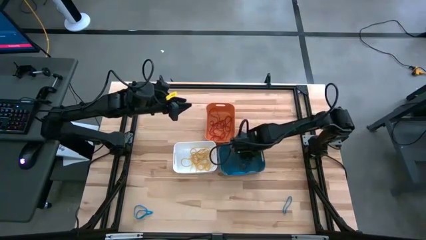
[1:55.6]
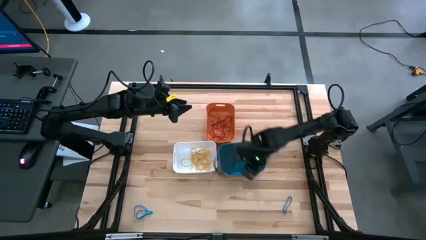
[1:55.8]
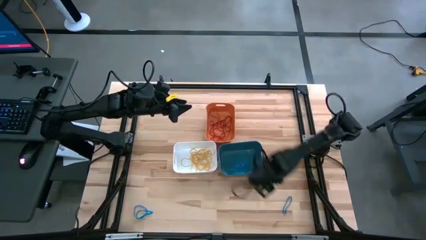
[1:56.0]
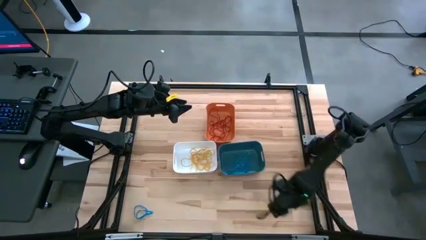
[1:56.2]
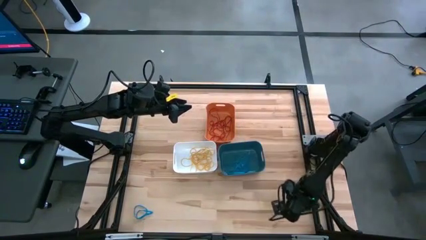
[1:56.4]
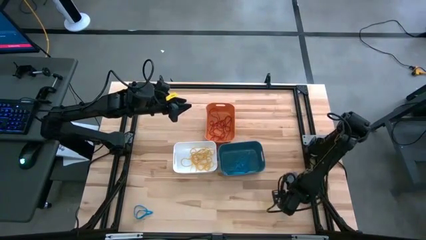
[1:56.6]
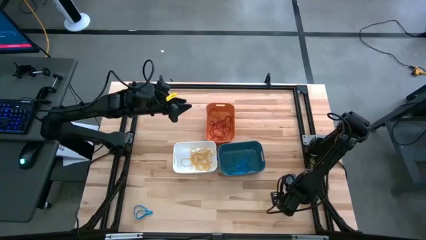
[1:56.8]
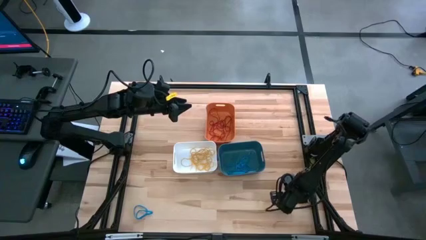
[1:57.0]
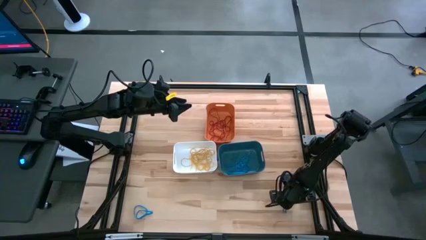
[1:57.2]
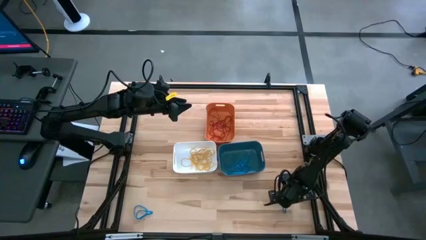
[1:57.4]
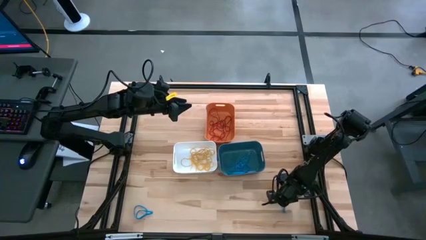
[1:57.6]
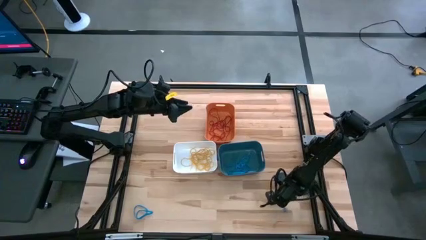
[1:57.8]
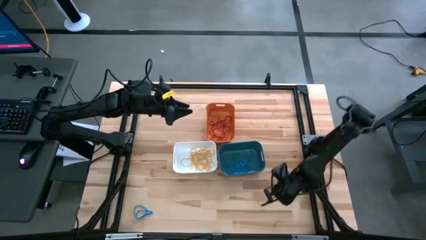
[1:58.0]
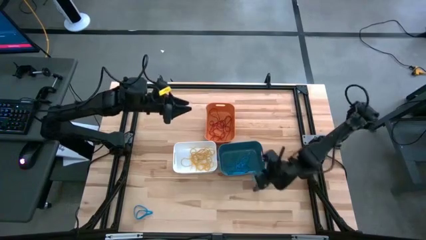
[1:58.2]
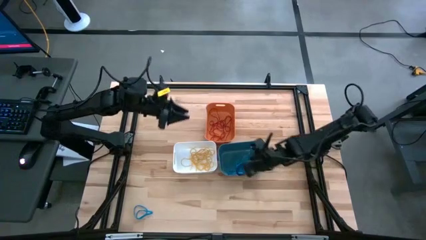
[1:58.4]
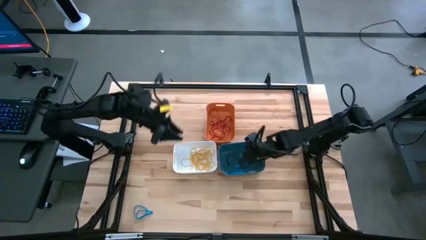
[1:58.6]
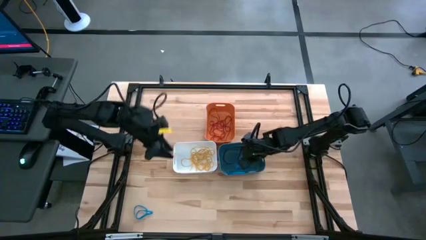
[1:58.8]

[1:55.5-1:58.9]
Task: Sort rubber bands into baskets
Put the blue rubber band into the blue bin

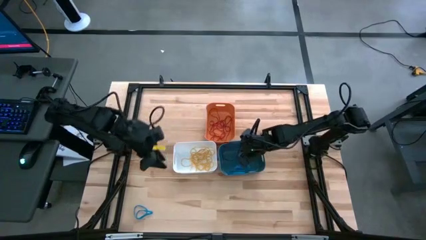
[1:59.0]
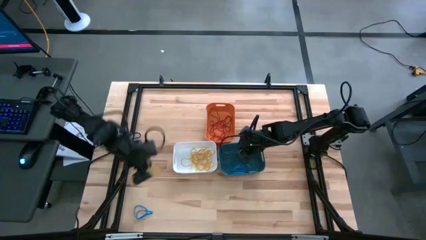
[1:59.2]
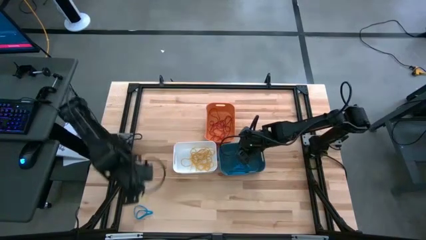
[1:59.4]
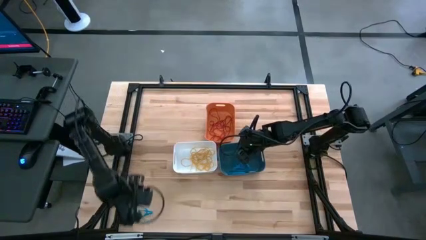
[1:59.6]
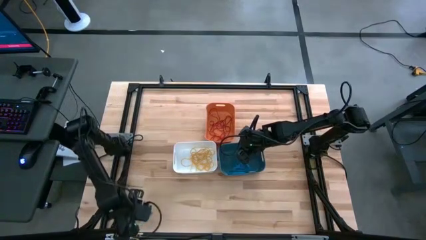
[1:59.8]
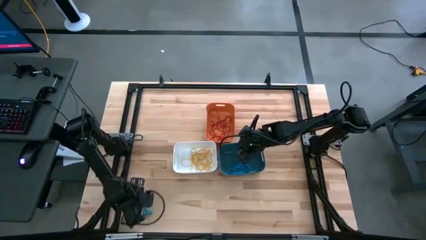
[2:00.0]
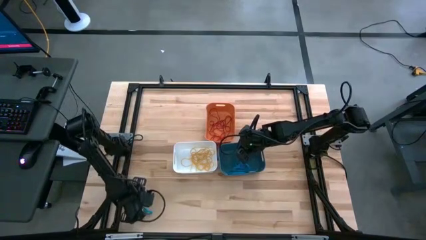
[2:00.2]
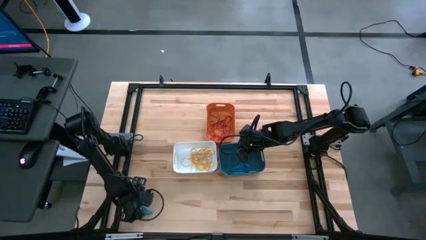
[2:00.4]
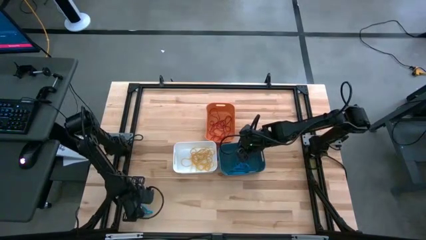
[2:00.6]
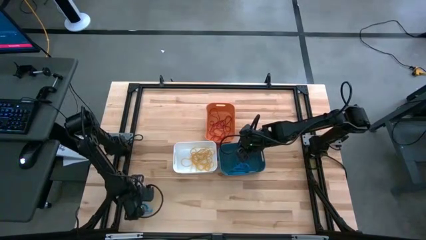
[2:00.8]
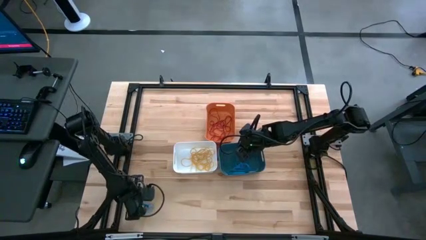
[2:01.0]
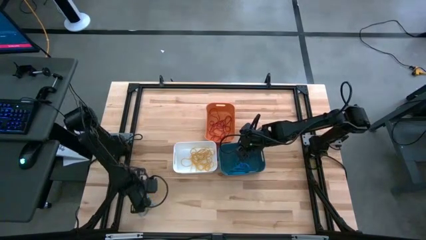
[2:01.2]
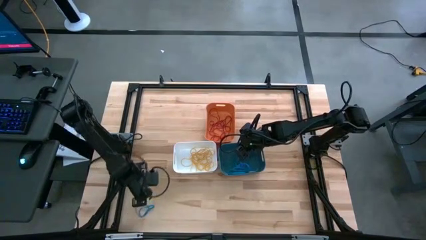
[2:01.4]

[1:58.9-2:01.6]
Put the blue rubber band into the blue bin

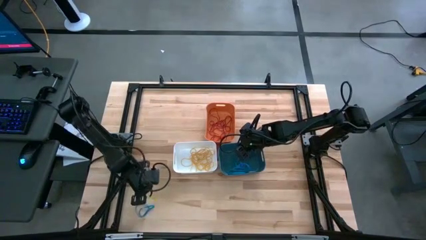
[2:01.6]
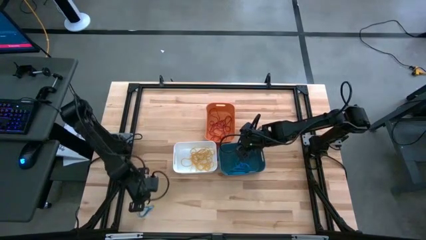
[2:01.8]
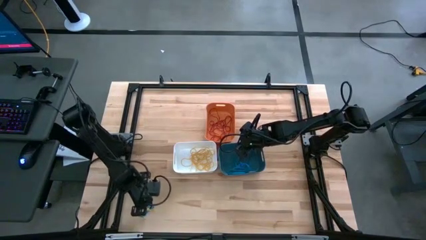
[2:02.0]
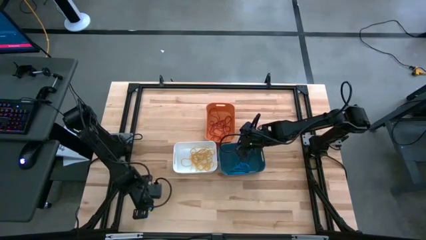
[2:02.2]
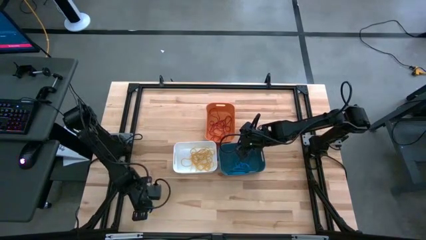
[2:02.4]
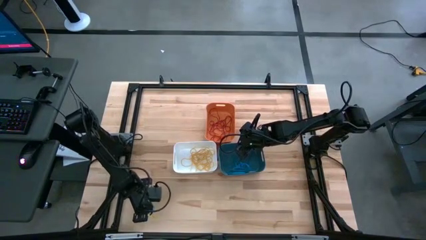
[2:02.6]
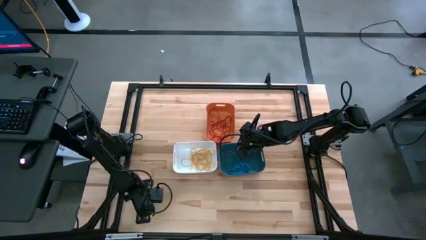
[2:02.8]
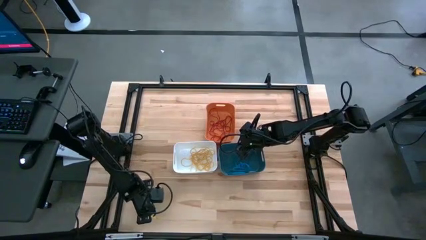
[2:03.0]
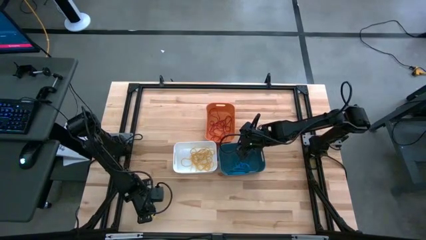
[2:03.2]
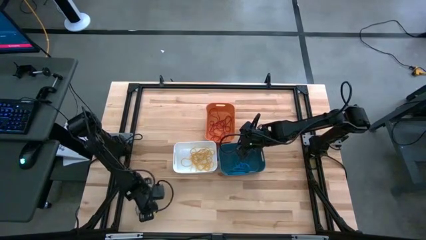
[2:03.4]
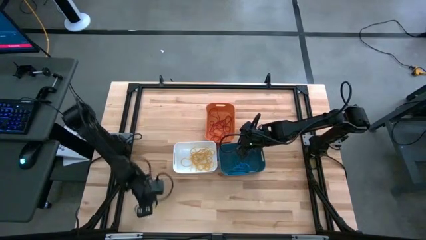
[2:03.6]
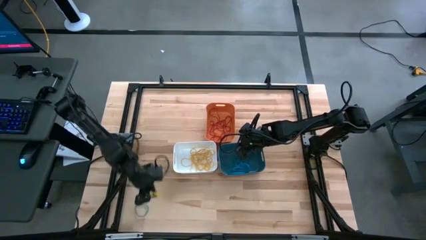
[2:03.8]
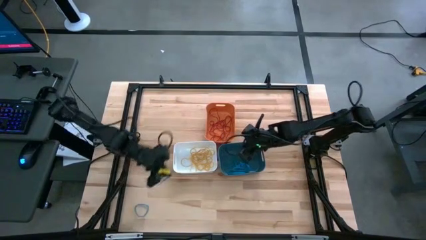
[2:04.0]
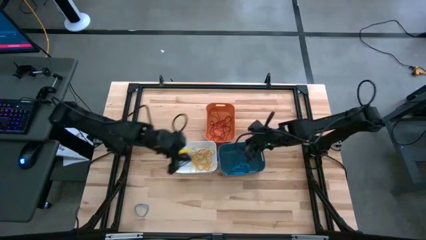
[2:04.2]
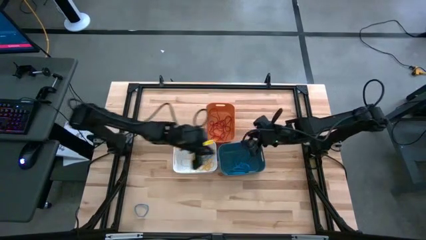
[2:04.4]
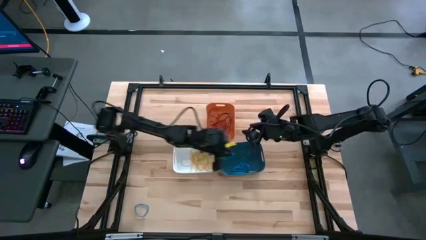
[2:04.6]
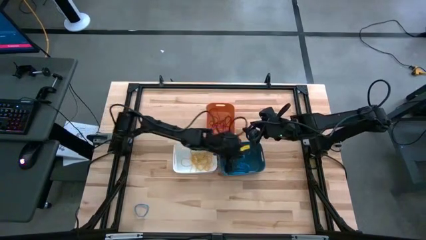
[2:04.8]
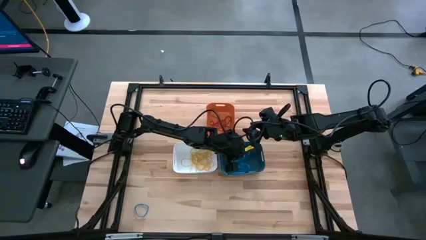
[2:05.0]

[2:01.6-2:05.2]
Put the blue rubber band into the blue bin

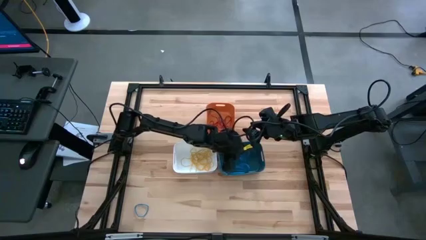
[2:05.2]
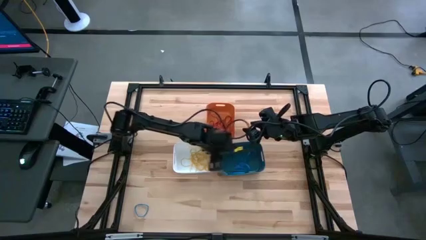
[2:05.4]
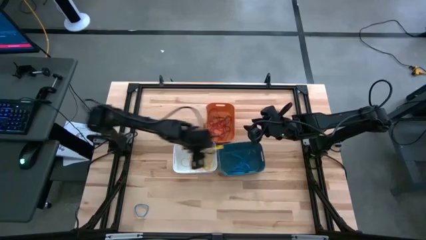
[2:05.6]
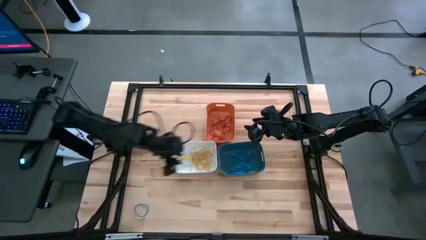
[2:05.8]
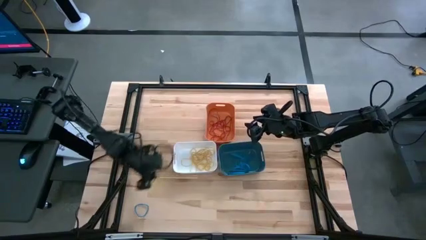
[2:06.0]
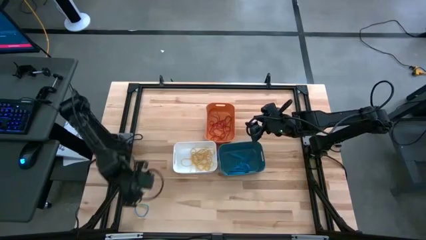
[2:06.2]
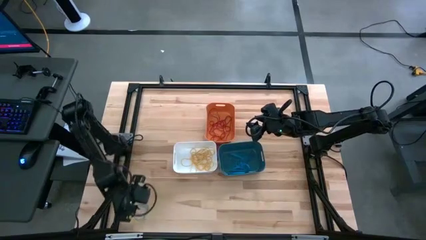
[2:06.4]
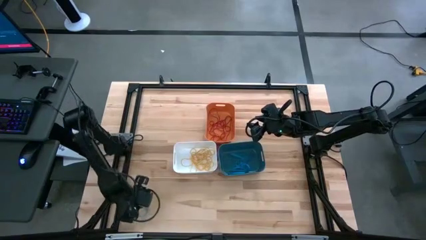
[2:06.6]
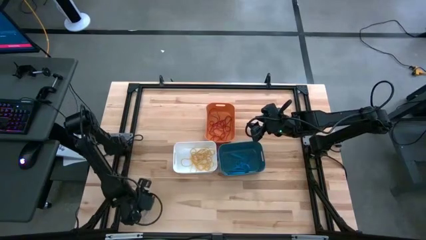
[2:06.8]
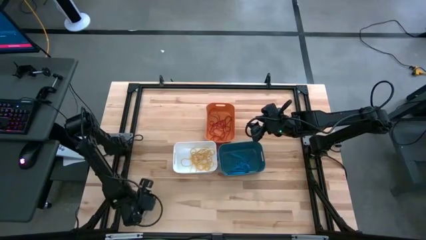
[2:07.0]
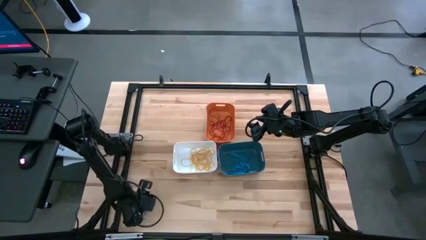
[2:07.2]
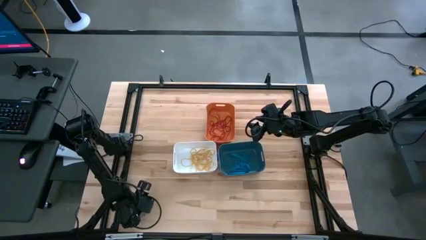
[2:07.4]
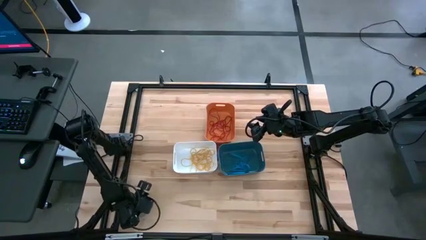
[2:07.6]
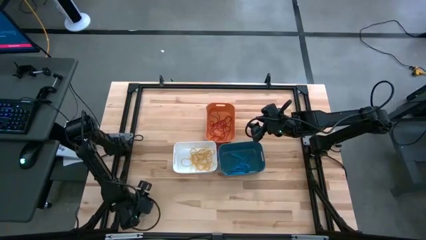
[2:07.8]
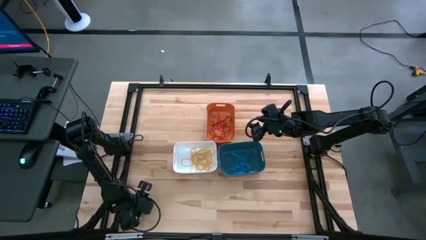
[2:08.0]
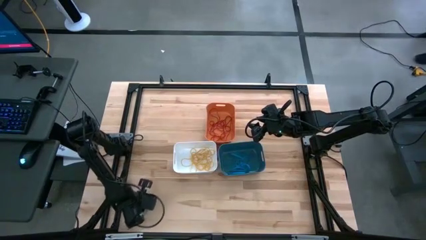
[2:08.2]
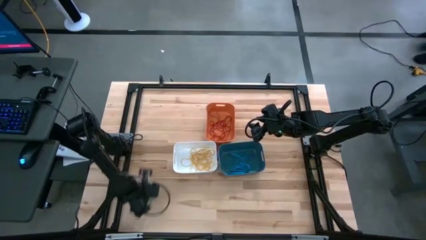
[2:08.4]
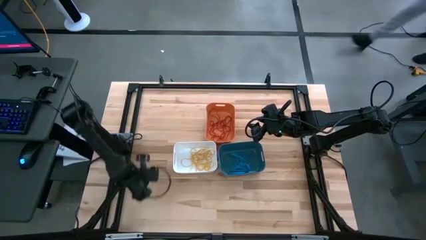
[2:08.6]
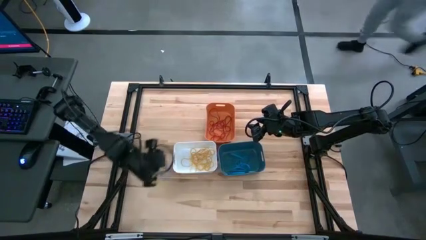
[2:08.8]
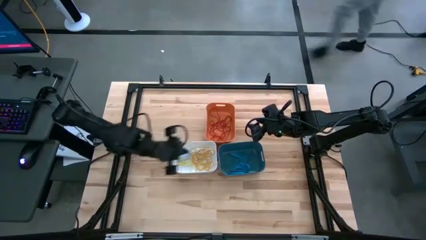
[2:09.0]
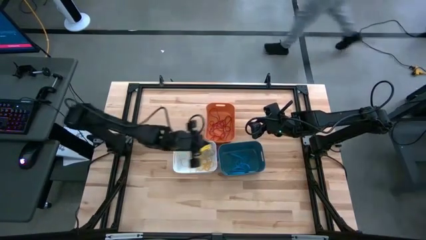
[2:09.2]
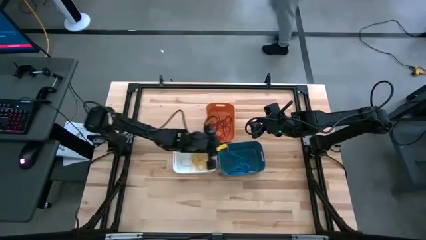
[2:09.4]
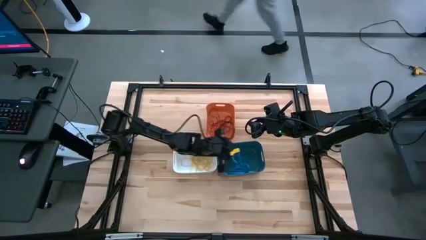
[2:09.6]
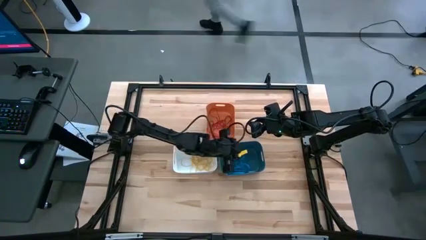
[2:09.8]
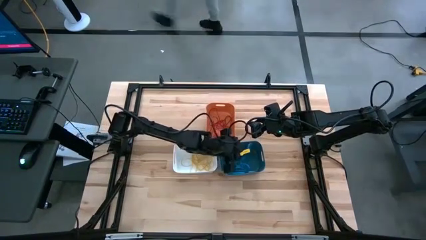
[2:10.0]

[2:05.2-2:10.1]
Put the blue rubber band into the blue bin
